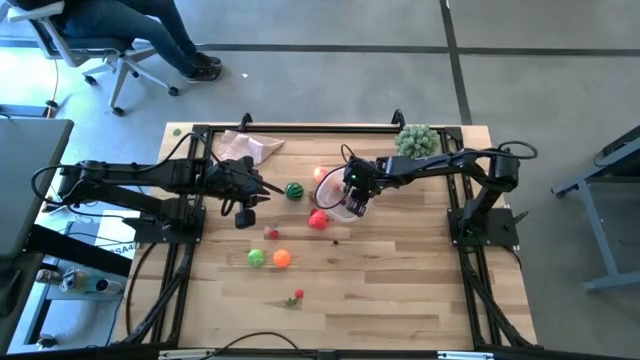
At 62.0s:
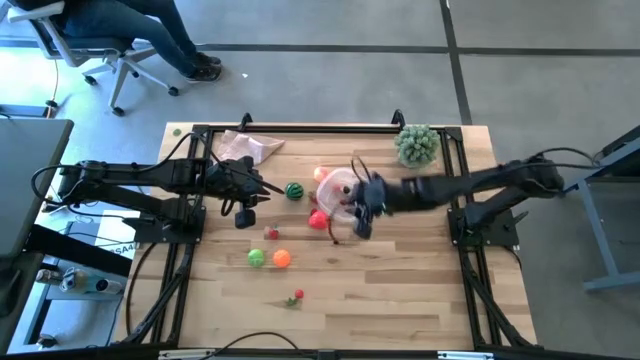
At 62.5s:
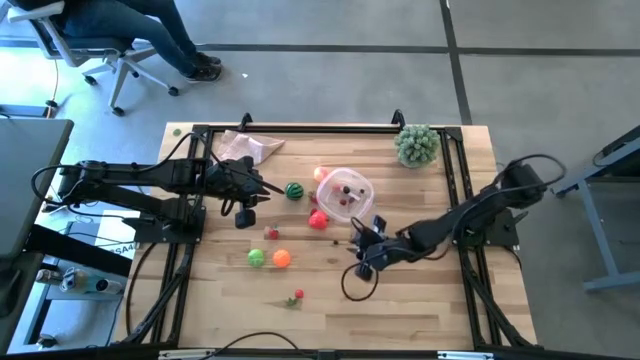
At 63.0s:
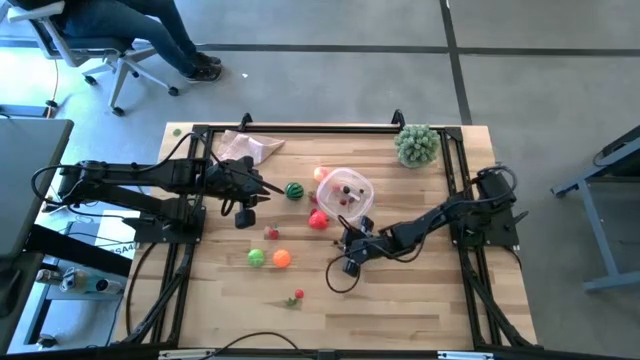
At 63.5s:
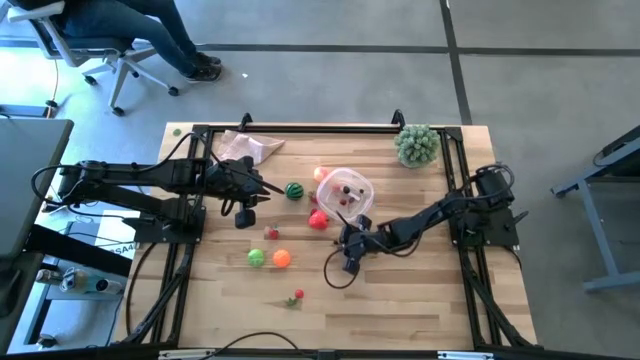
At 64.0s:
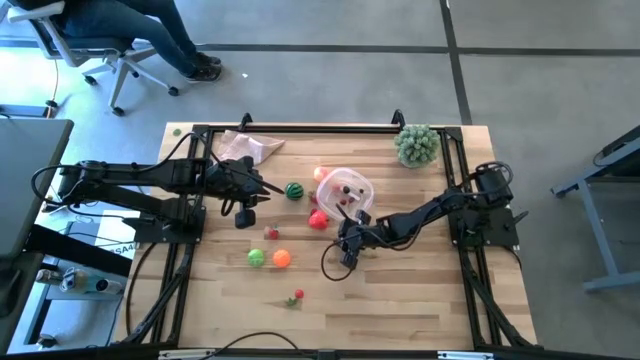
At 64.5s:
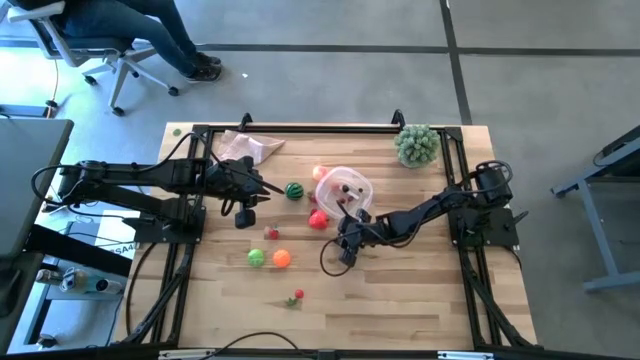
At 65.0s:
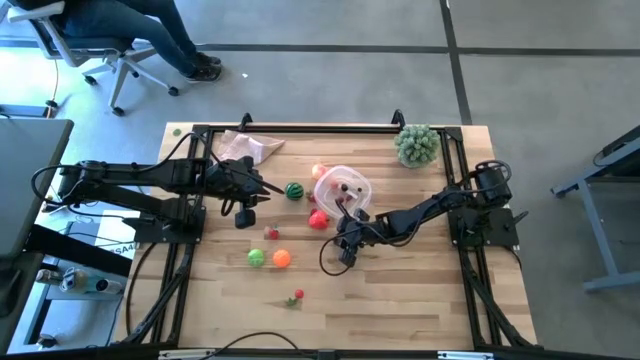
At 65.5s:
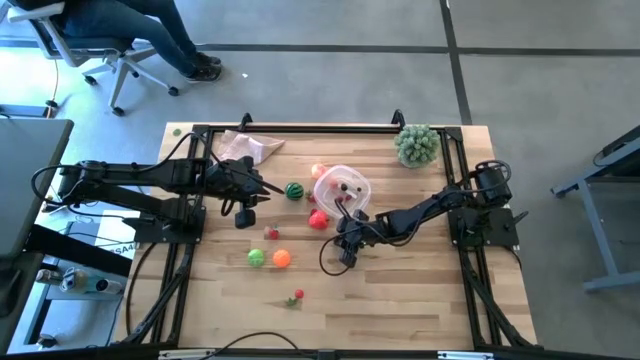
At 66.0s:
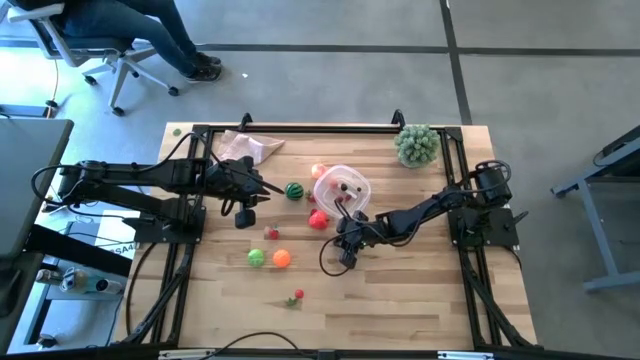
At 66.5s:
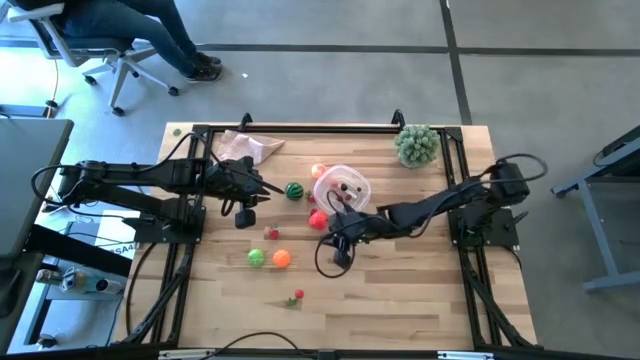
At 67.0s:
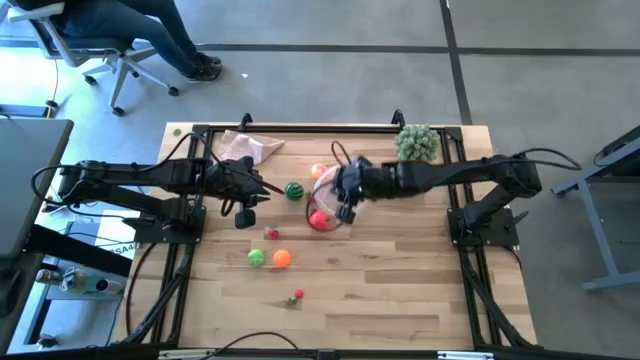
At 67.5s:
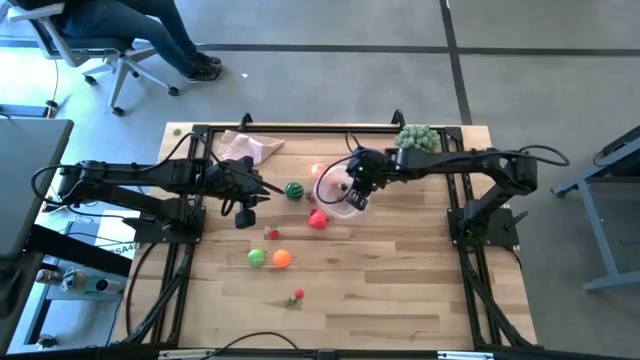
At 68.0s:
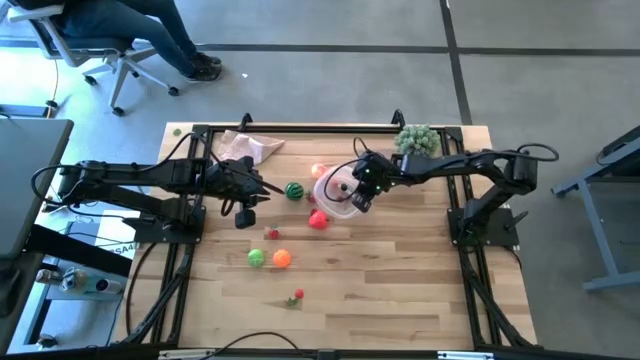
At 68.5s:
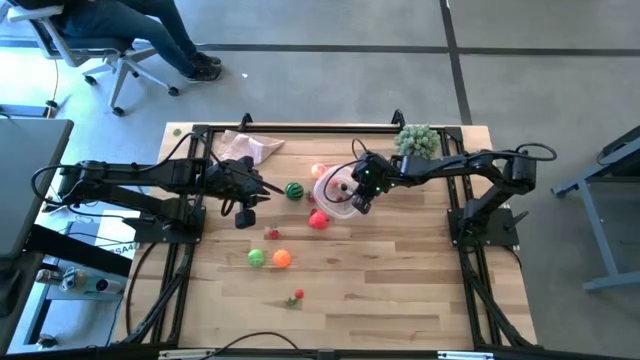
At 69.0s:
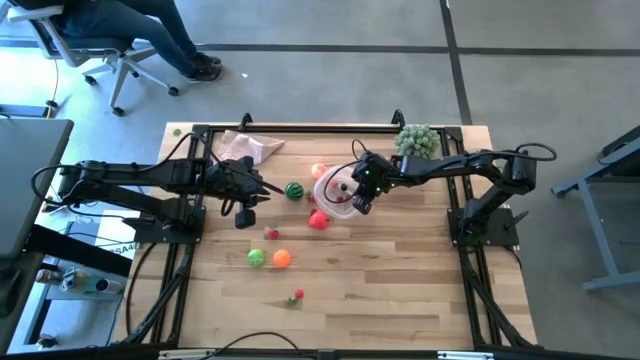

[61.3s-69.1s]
Task: Pick and placing Produce into tupperware
Put the blueberry into the transparent bin

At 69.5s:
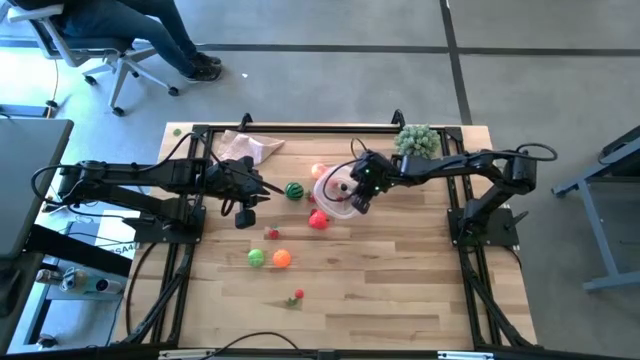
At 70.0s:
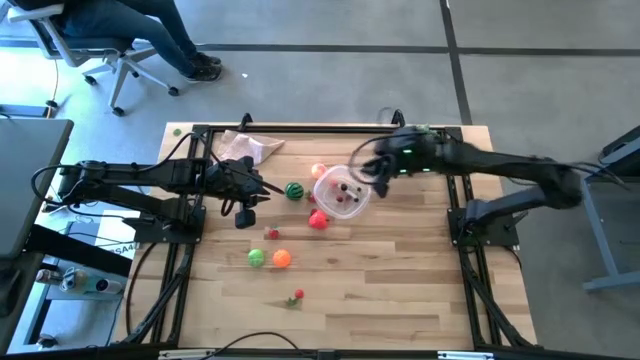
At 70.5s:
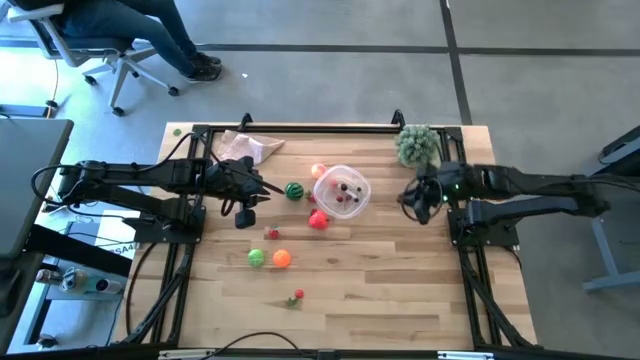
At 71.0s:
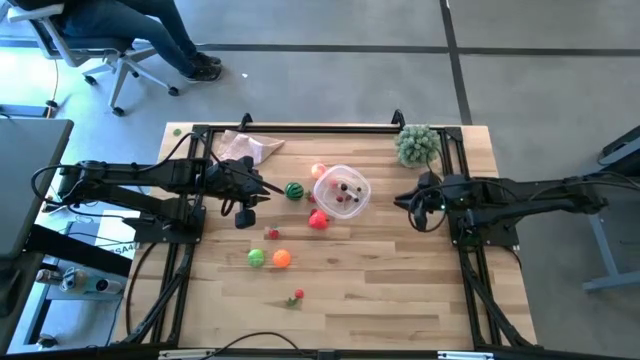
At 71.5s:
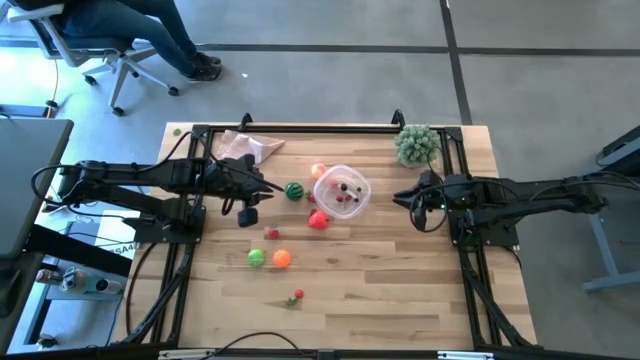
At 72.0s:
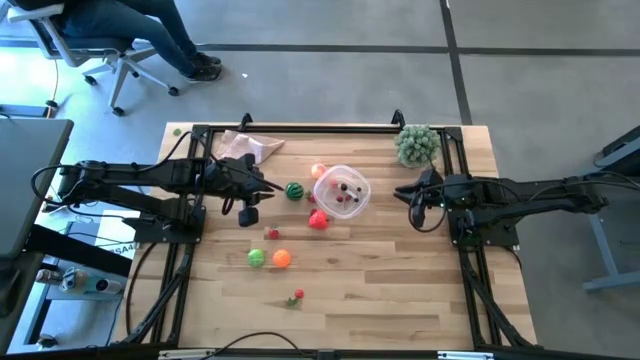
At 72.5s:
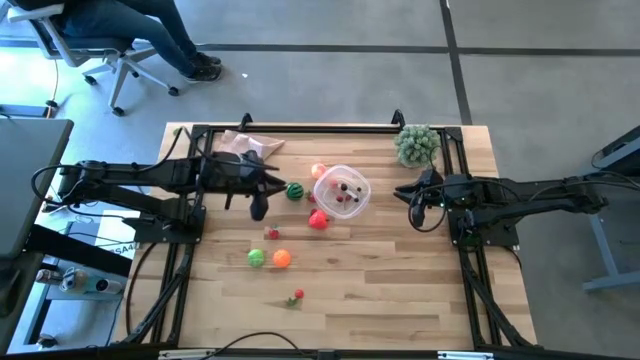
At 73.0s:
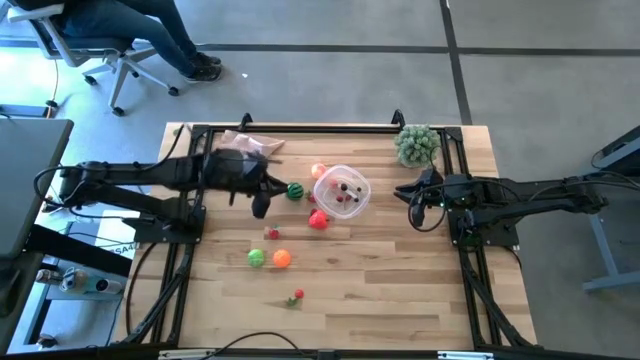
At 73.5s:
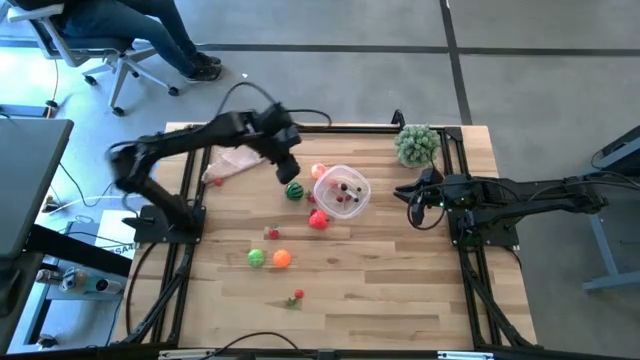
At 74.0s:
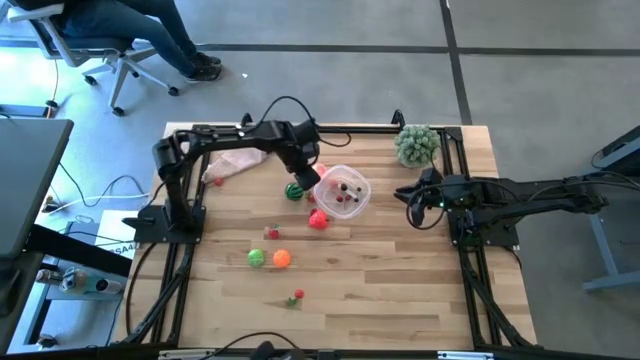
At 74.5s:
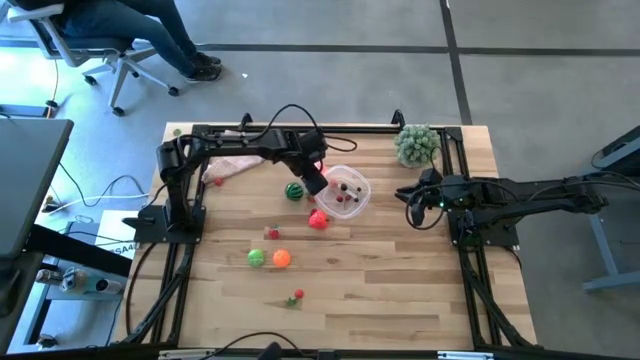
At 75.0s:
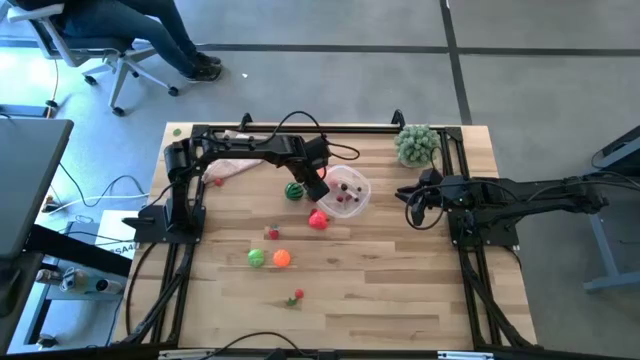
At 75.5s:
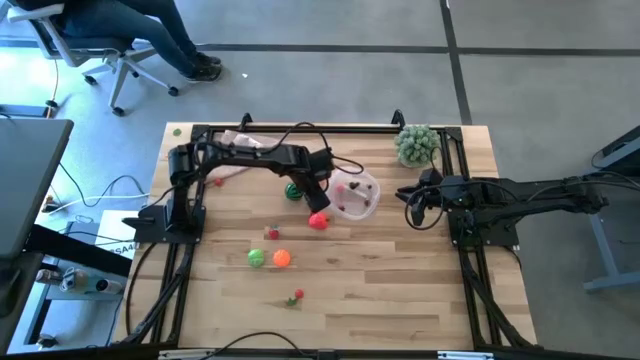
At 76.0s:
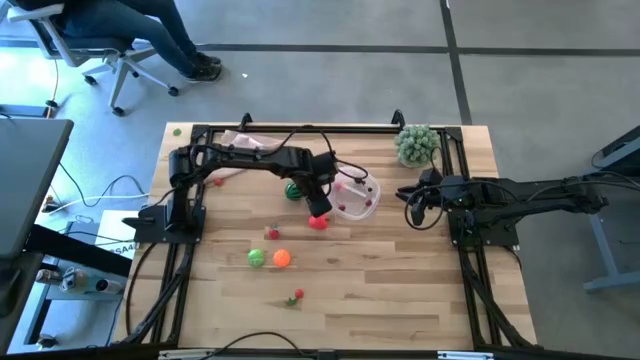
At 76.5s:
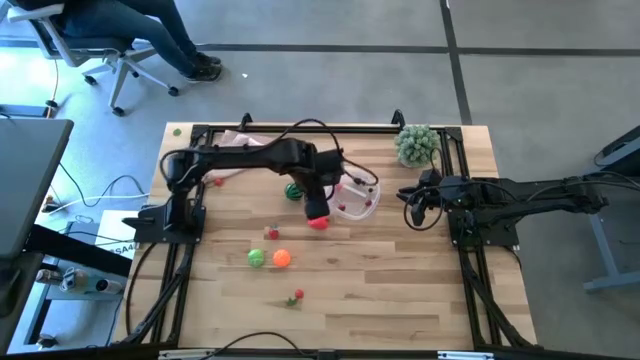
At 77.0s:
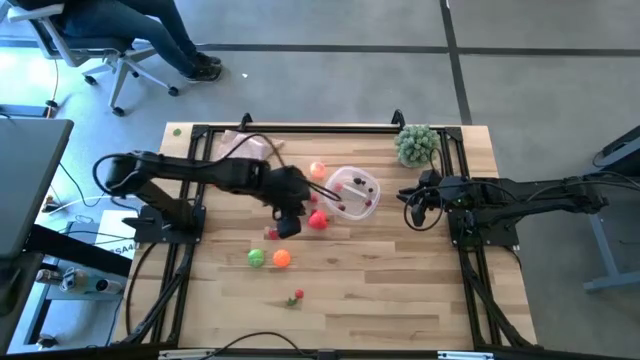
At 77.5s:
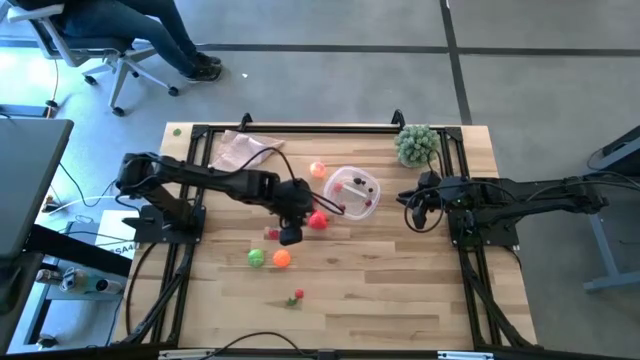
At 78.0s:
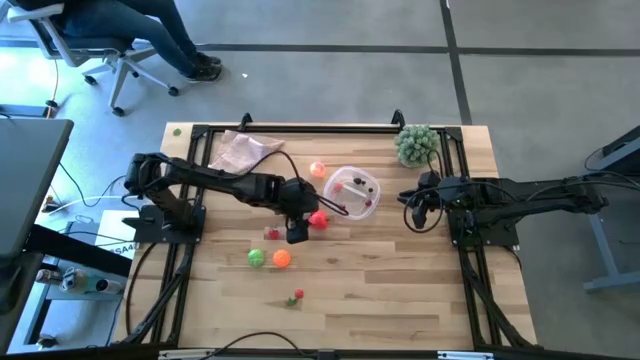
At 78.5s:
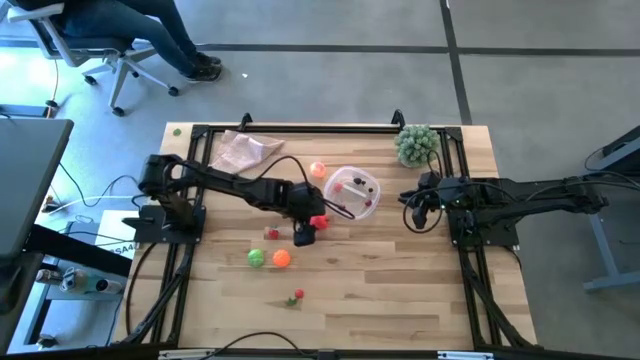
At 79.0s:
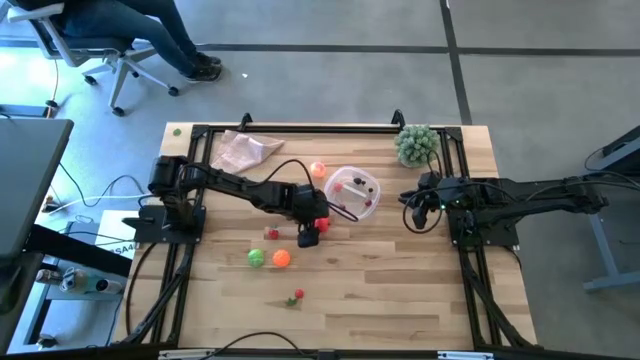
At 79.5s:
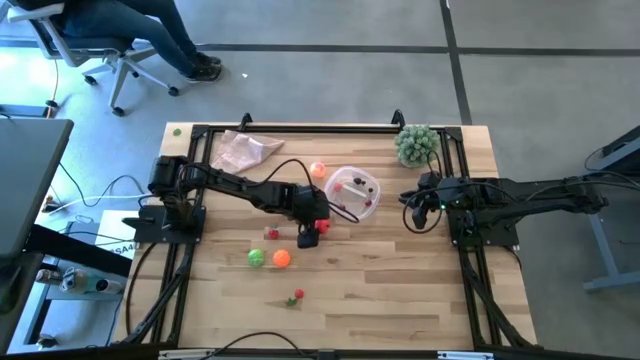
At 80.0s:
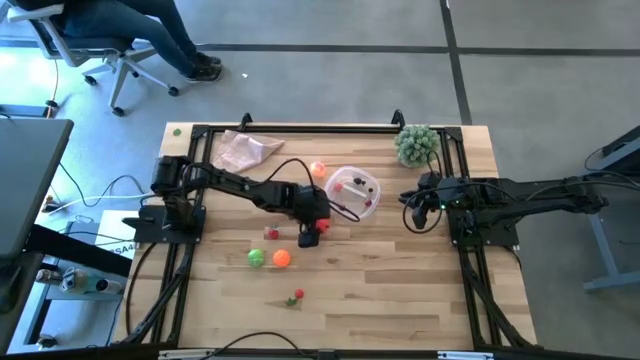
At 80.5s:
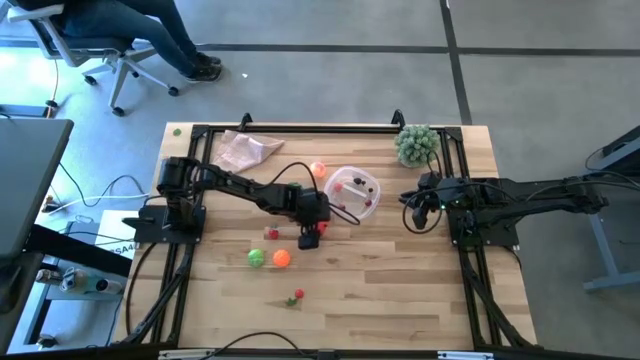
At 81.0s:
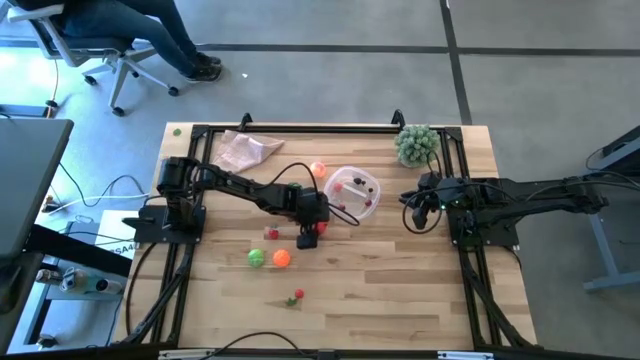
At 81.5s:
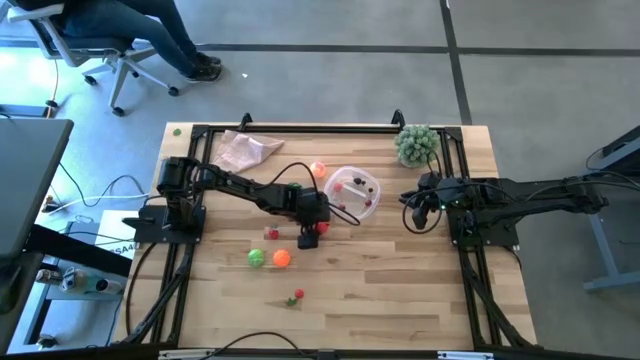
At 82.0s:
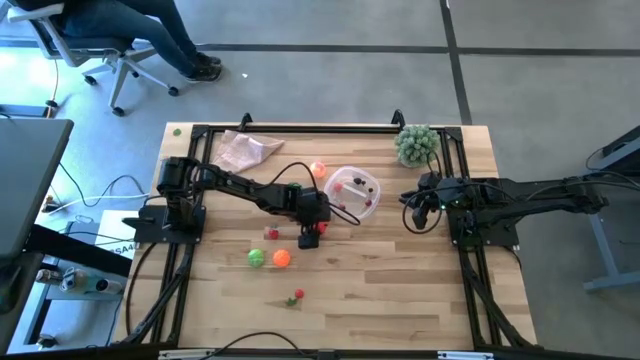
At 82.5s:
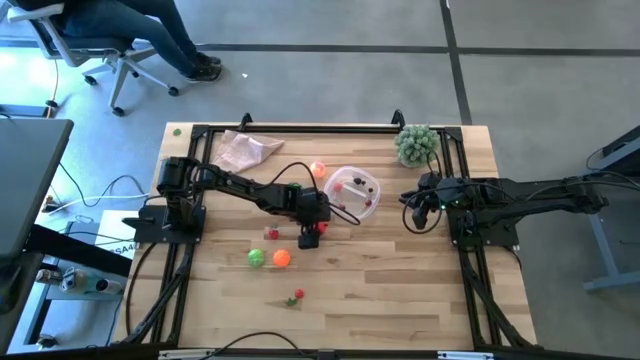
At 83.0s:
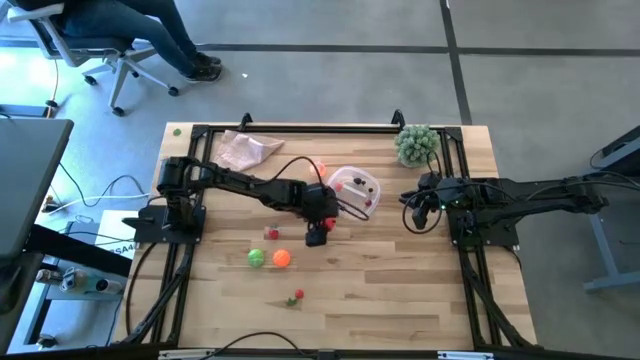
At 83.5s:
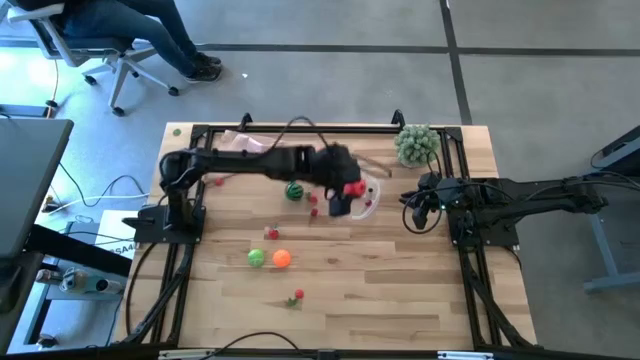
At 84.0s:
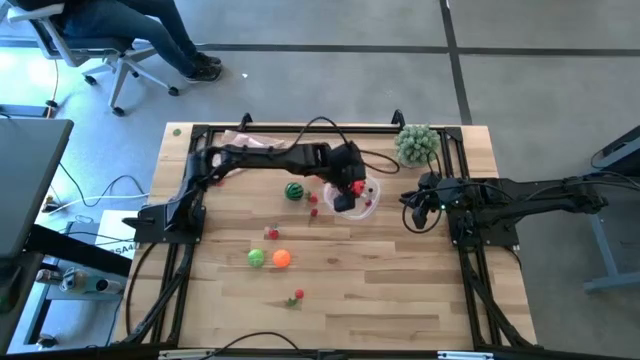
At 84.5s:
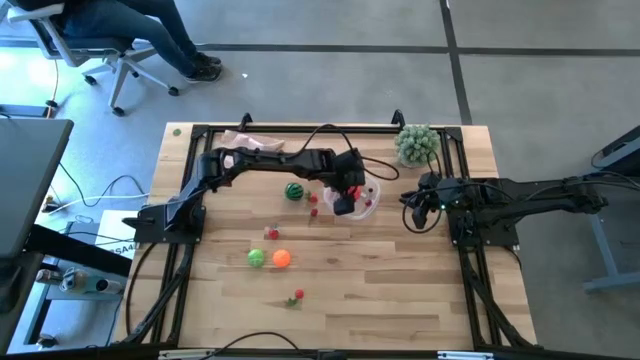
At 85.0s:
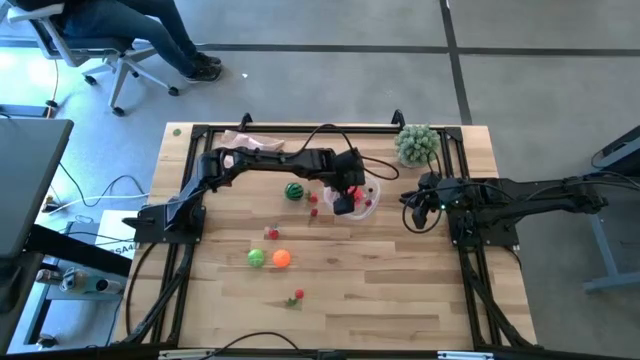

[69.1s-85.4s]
Put the apple into the transparent bin
